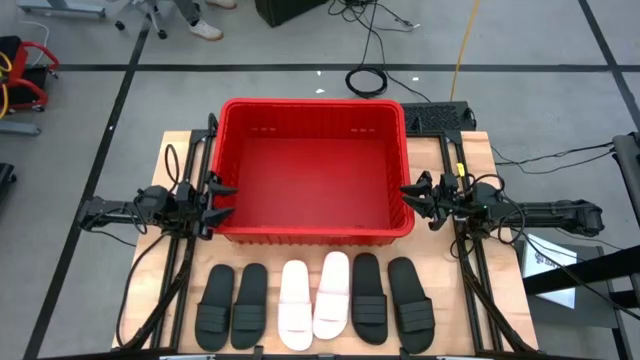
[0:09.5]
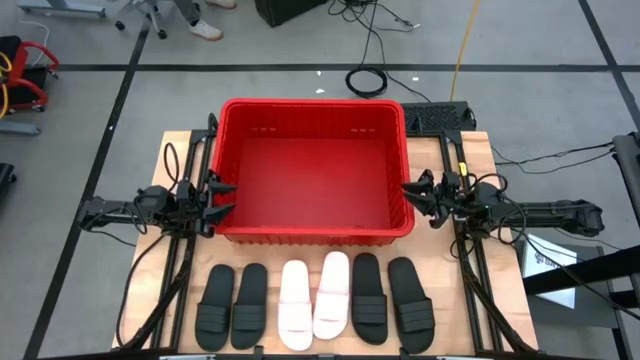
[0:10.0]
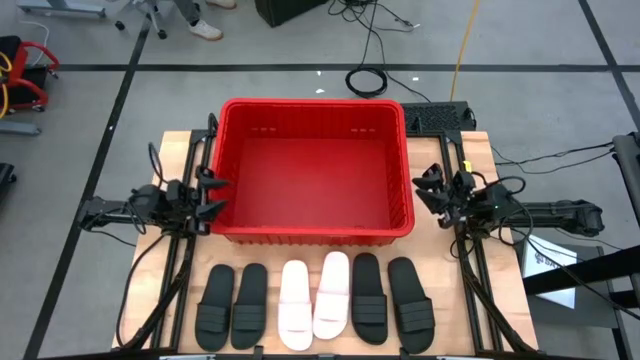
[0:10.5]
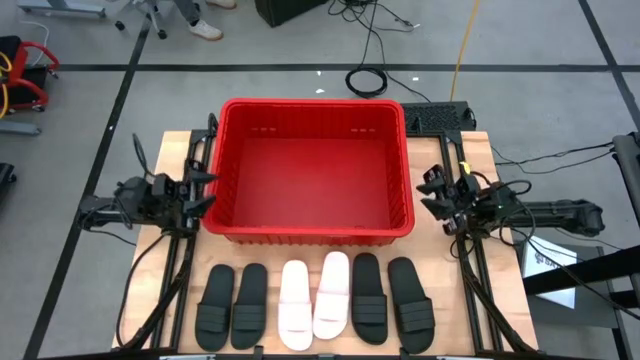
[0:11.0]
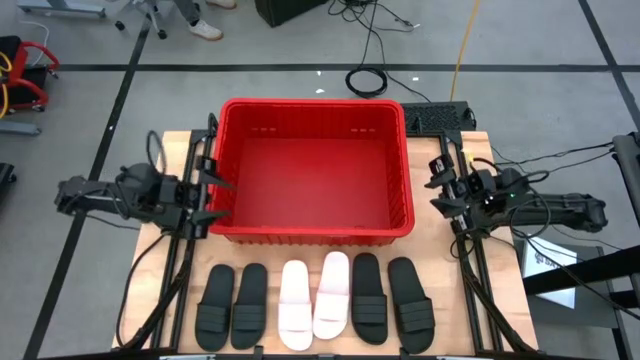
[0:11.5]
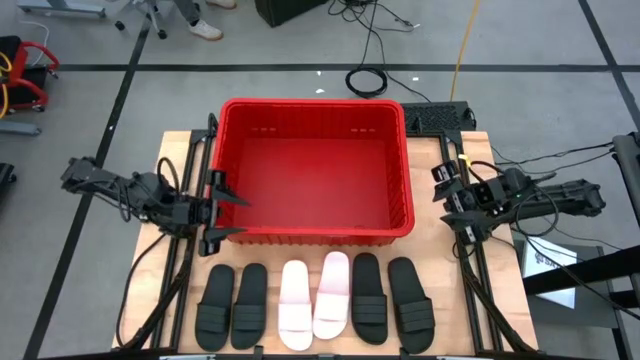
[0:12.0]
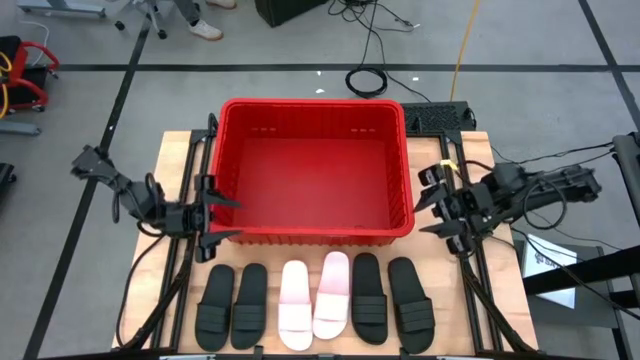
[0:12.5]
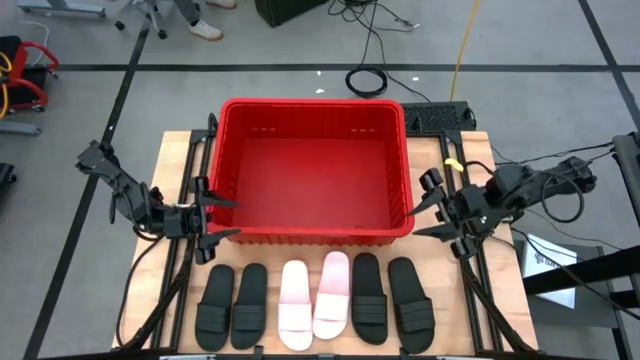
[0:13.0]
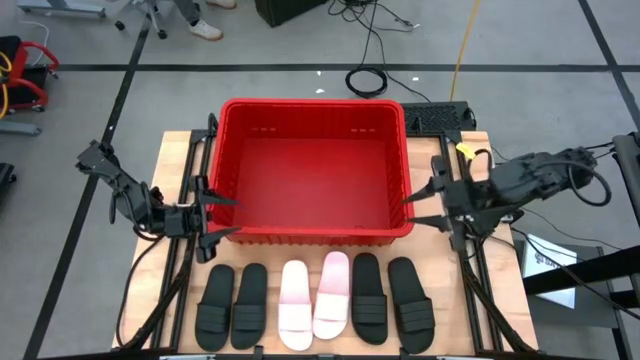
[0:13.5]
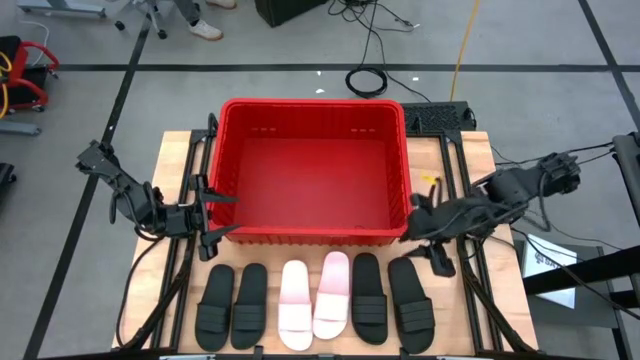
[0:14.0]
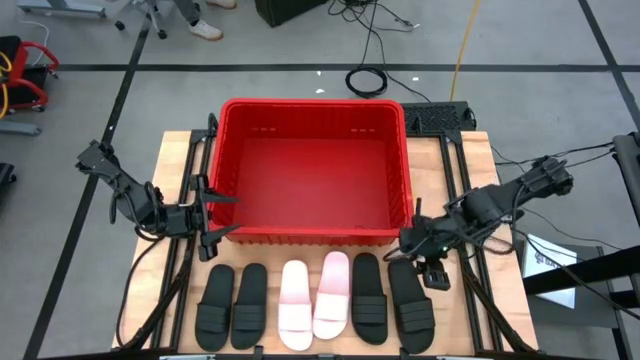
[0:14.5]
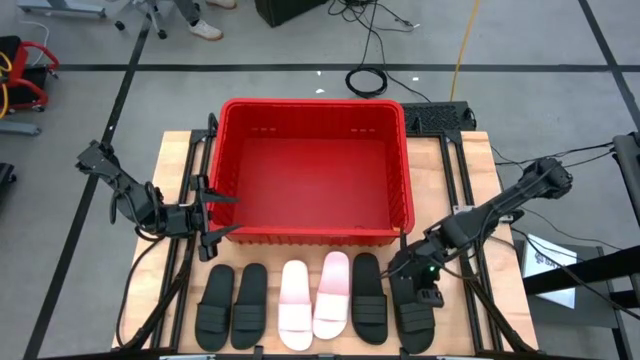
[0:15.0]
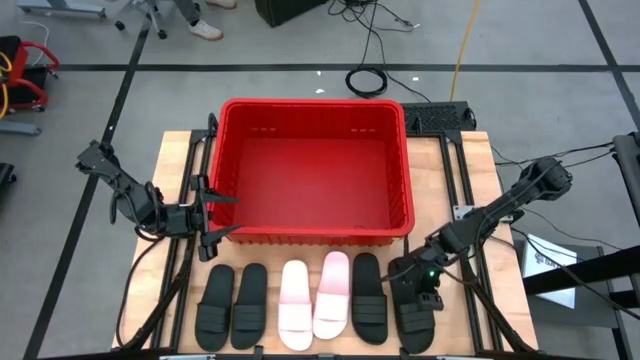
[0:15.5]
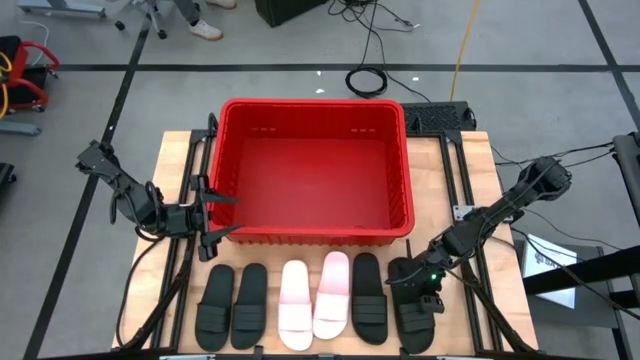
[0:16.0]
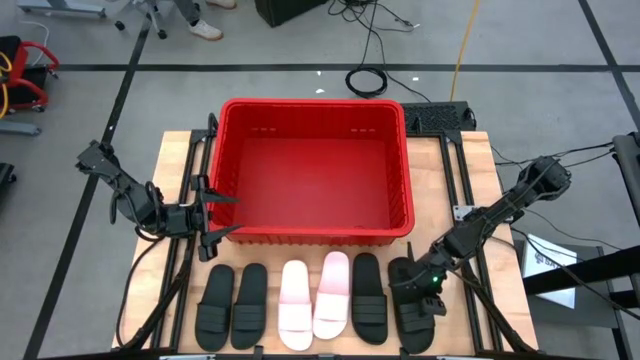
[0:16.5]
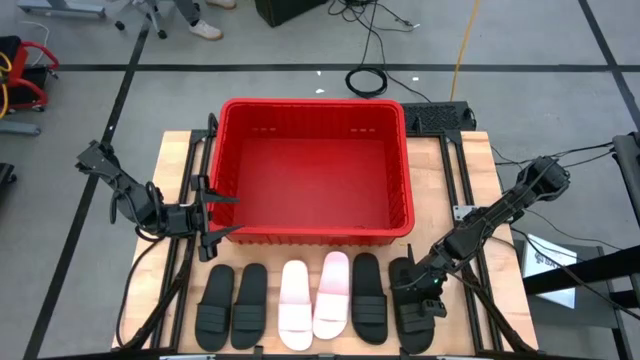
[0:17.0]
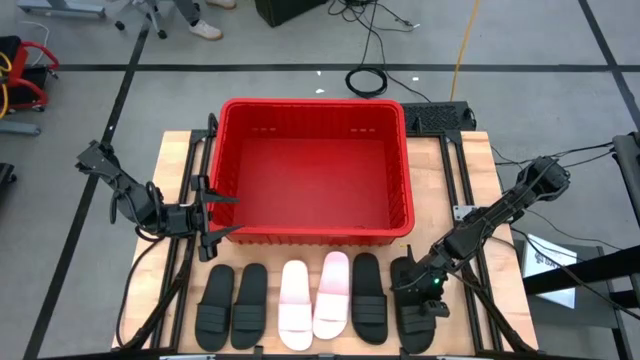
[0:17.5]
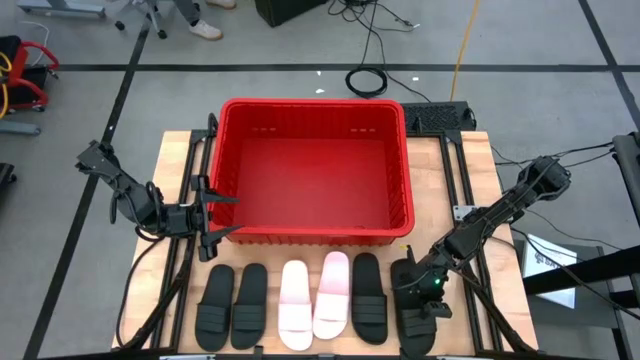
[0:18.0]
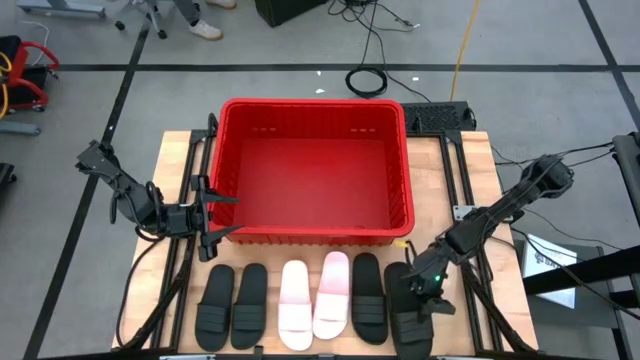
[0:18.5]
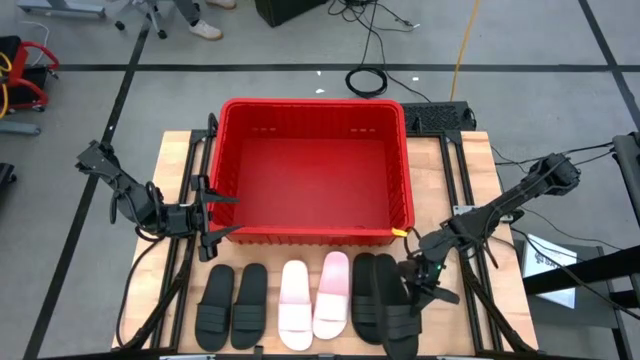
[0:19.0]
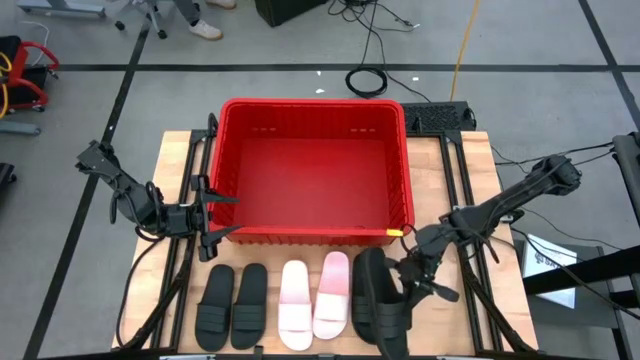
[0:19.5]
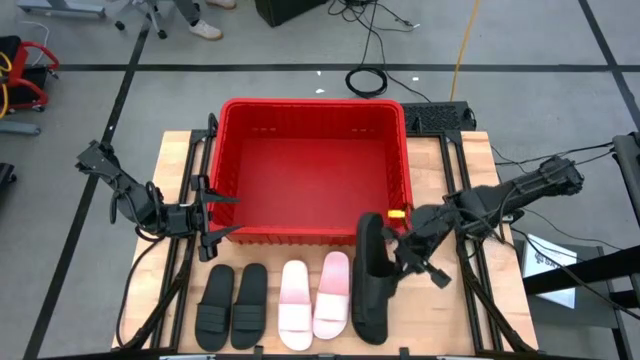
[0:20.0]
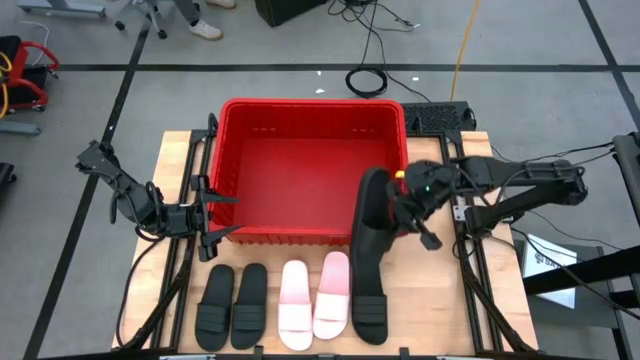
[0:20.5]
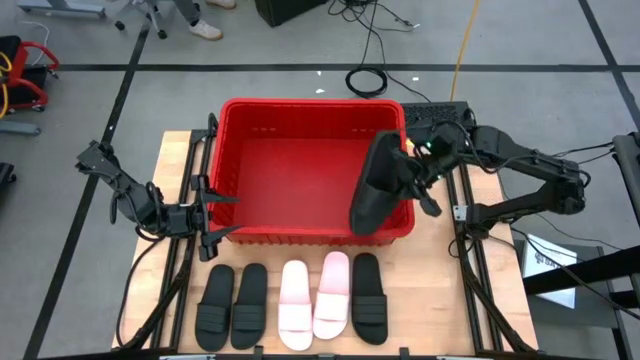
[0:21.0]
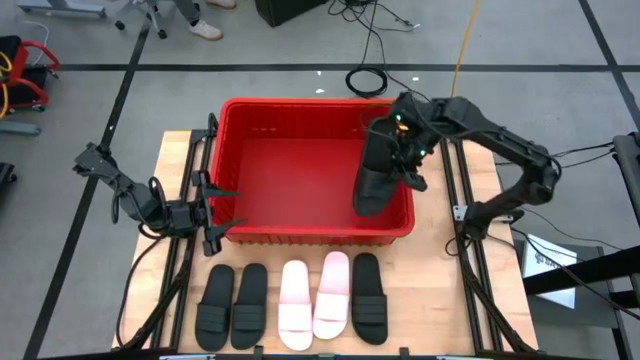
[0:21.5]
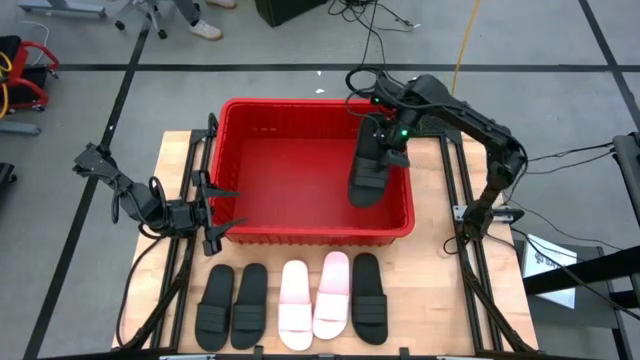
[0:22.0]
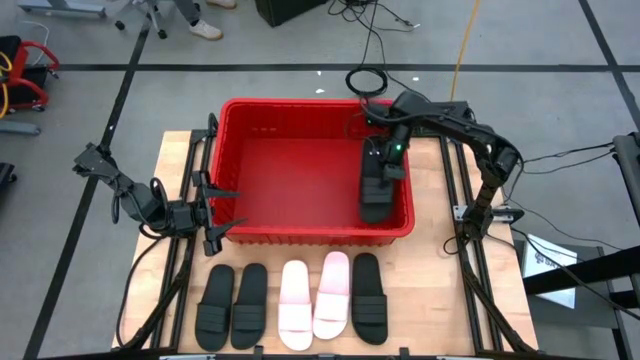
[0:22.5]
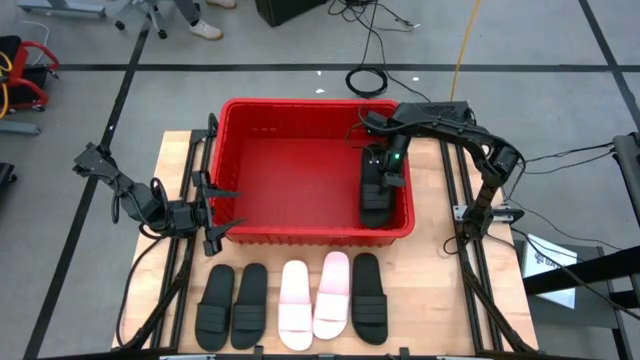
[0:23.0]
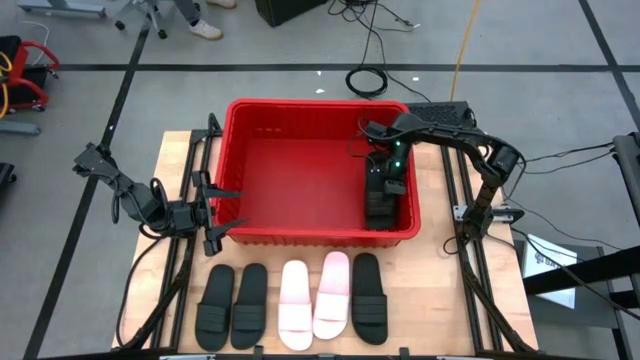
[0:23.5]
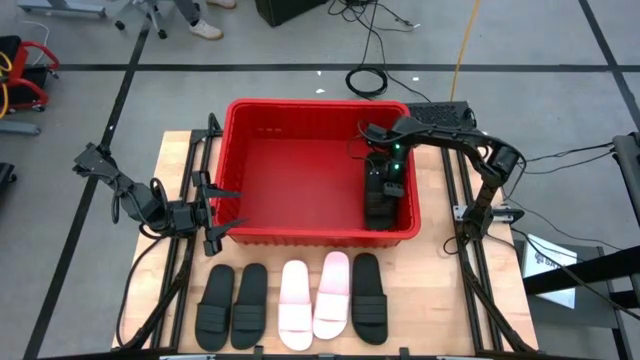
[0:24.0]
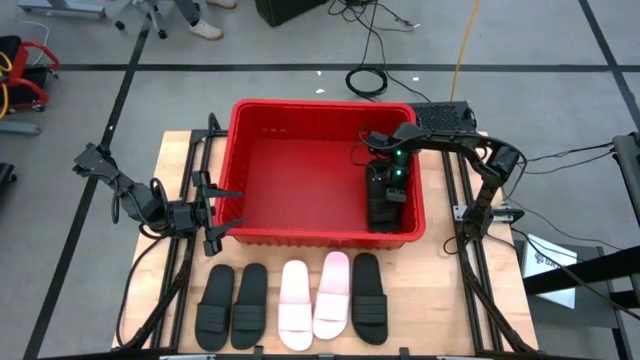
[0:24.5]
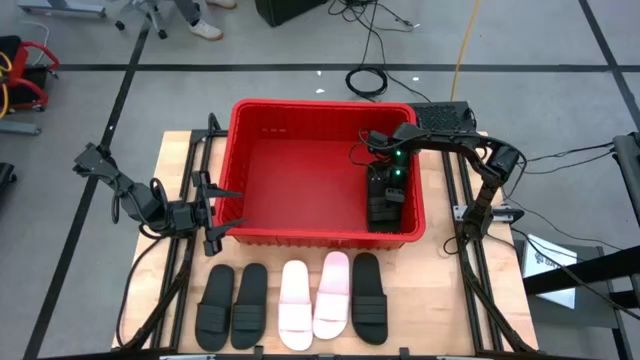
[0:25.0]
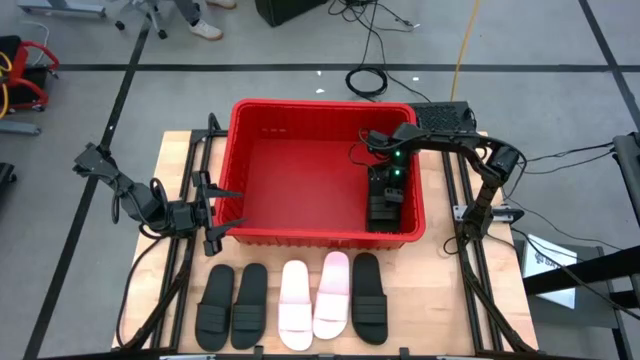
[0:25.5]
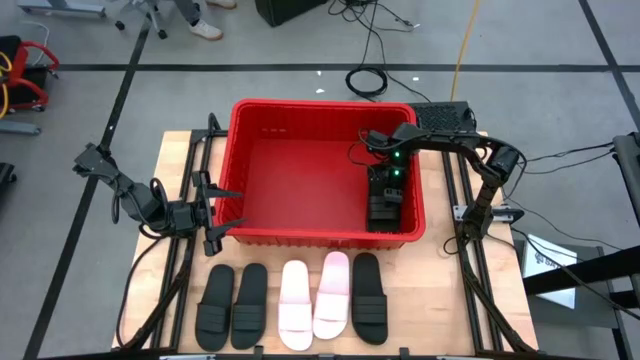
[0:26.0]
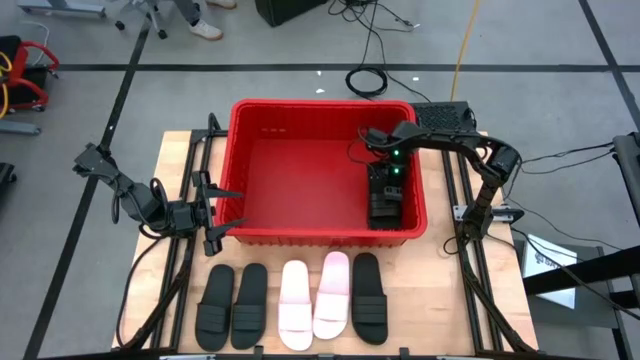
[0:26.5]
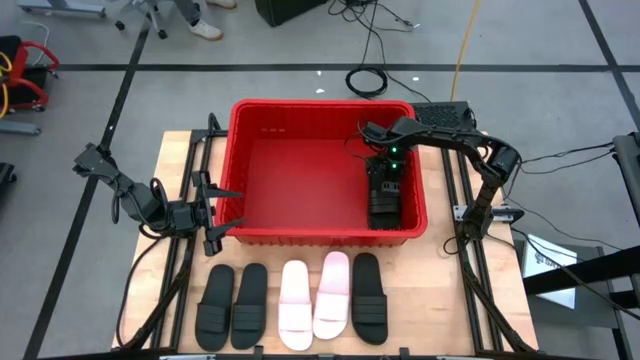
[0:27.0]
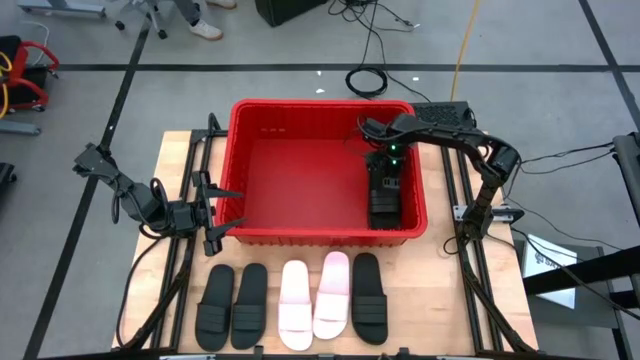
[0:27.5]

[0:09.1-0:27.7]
Task: Pick and place slides into bin
Put the black slide into the red container
